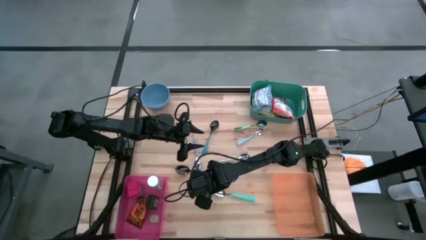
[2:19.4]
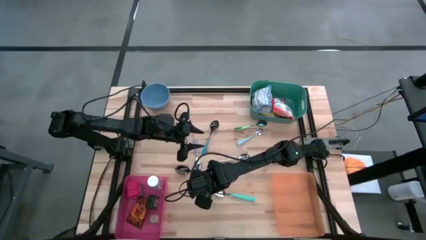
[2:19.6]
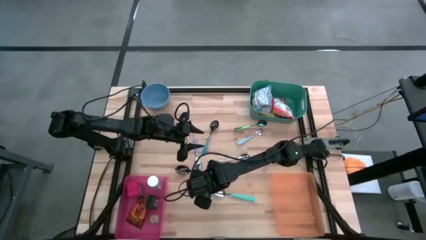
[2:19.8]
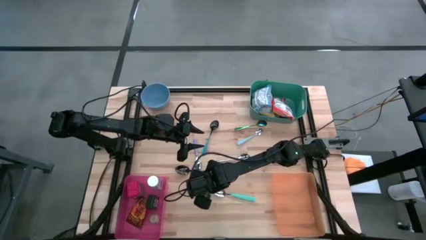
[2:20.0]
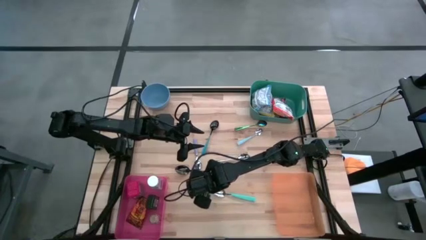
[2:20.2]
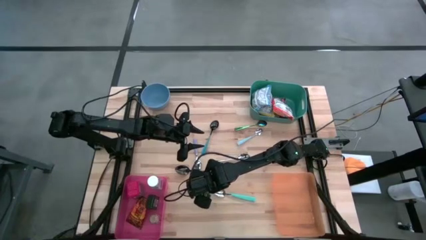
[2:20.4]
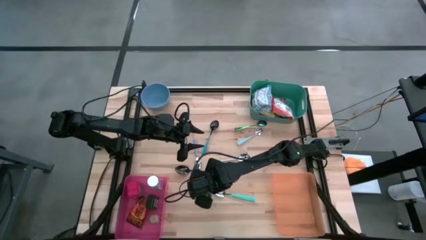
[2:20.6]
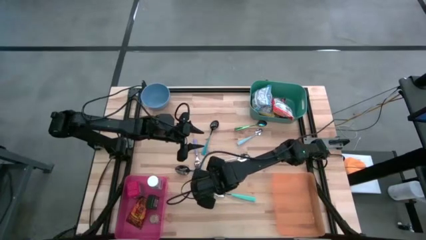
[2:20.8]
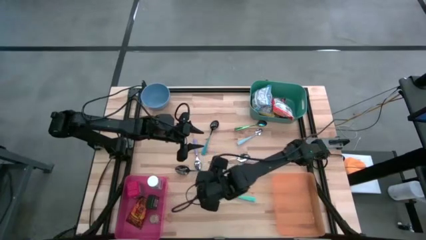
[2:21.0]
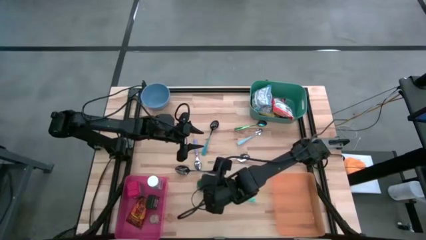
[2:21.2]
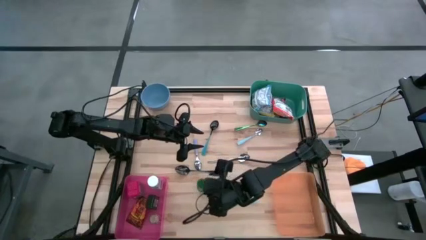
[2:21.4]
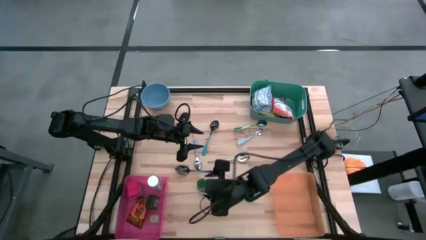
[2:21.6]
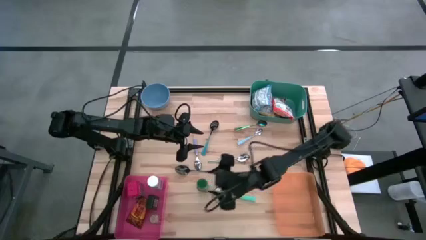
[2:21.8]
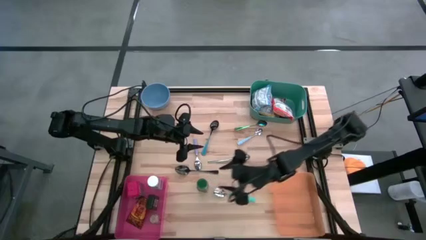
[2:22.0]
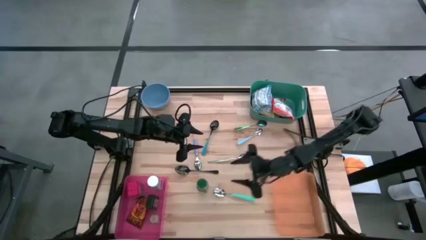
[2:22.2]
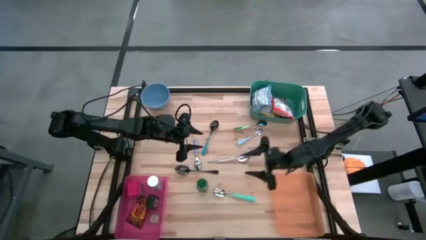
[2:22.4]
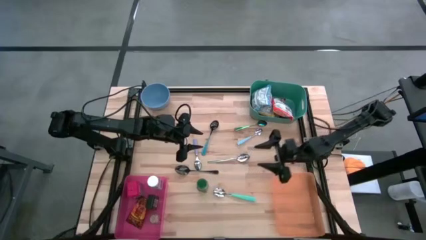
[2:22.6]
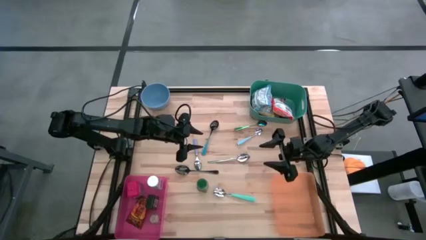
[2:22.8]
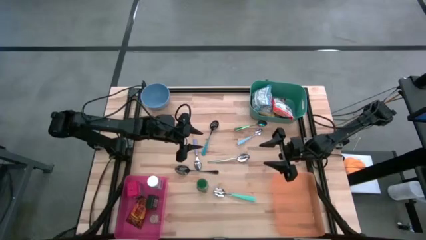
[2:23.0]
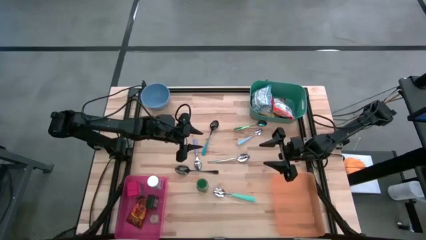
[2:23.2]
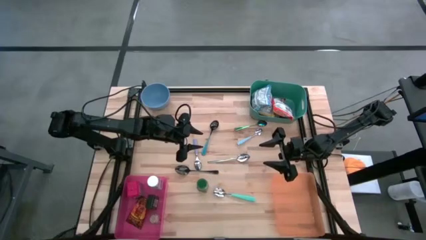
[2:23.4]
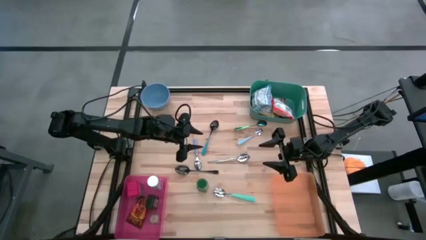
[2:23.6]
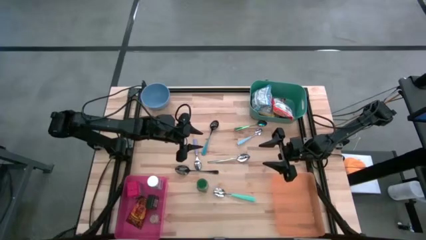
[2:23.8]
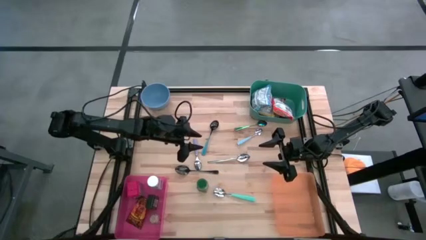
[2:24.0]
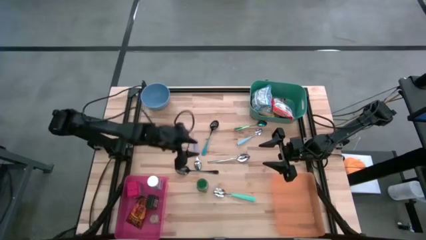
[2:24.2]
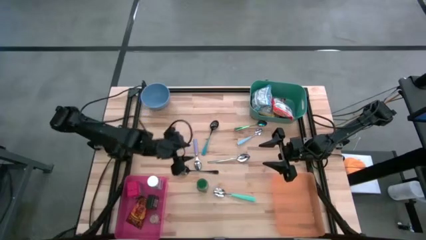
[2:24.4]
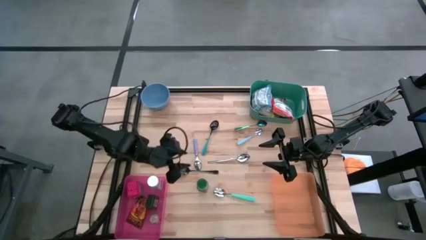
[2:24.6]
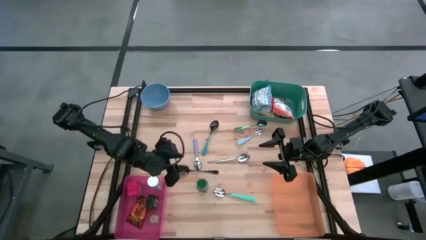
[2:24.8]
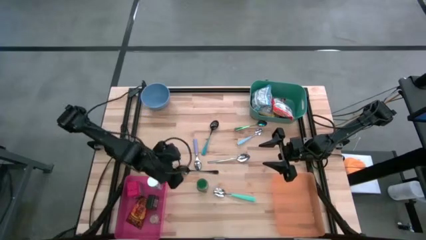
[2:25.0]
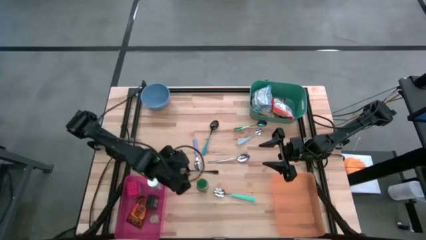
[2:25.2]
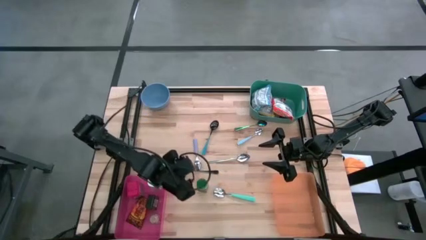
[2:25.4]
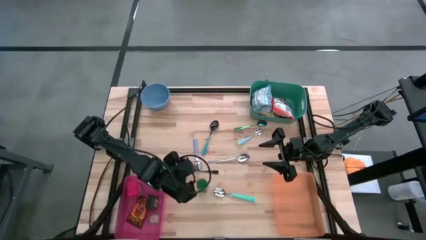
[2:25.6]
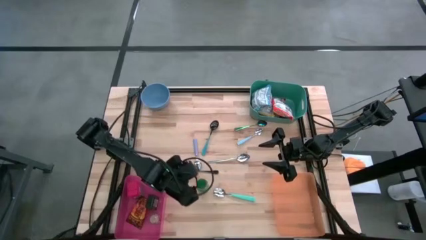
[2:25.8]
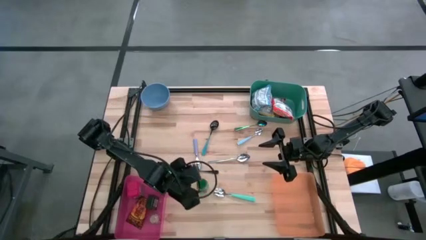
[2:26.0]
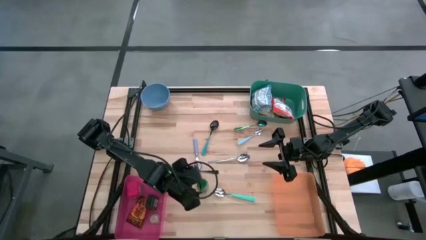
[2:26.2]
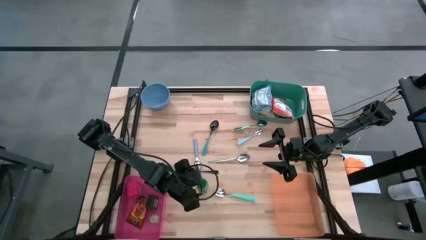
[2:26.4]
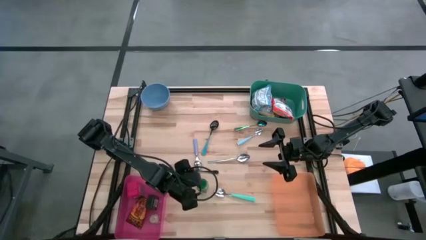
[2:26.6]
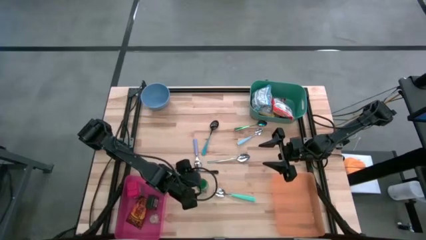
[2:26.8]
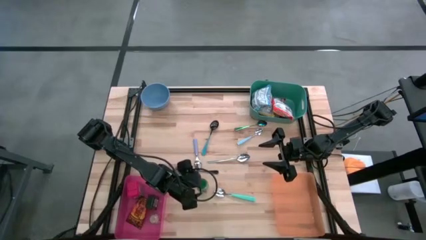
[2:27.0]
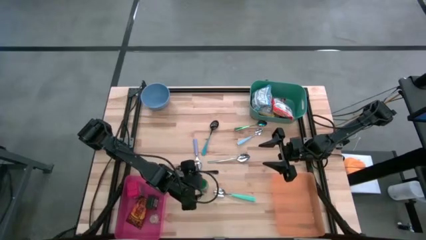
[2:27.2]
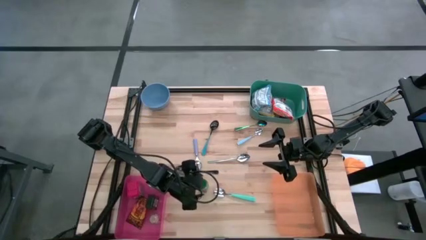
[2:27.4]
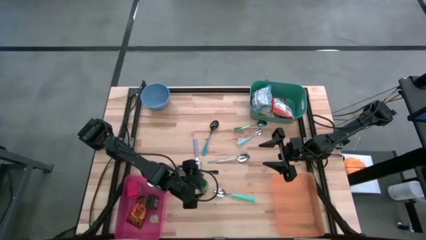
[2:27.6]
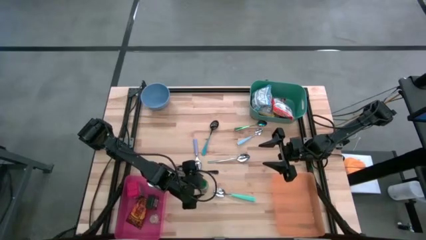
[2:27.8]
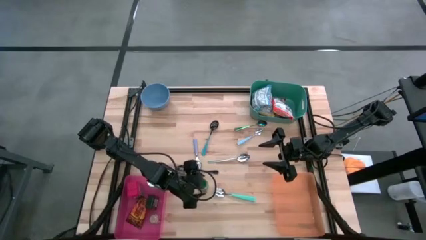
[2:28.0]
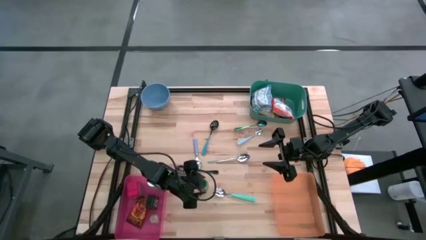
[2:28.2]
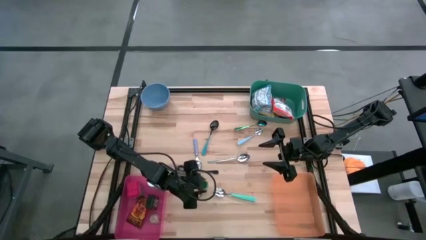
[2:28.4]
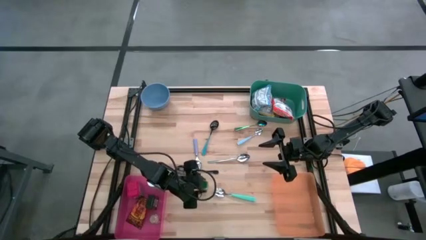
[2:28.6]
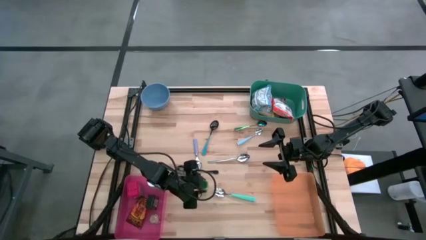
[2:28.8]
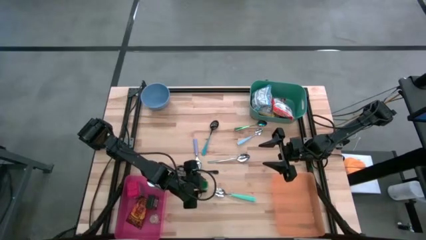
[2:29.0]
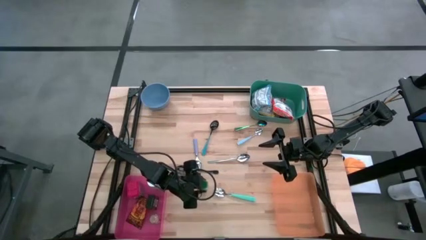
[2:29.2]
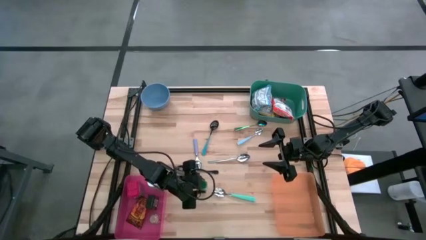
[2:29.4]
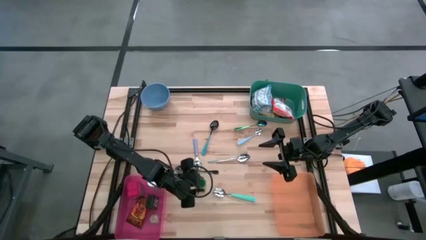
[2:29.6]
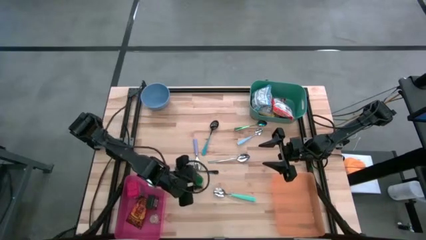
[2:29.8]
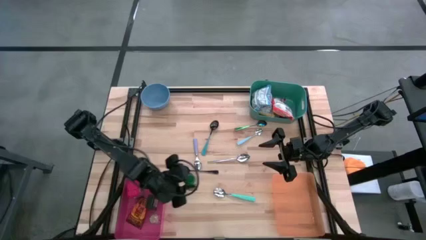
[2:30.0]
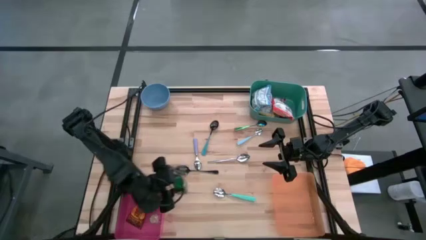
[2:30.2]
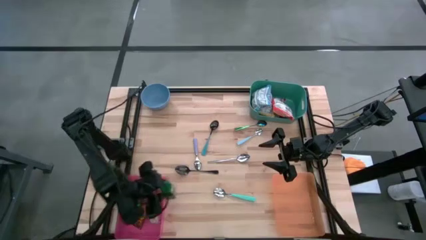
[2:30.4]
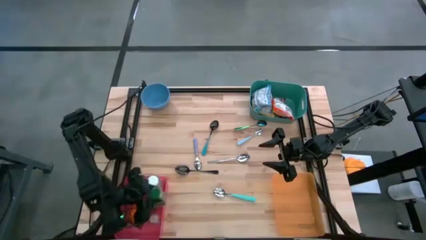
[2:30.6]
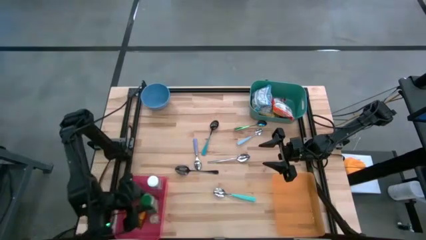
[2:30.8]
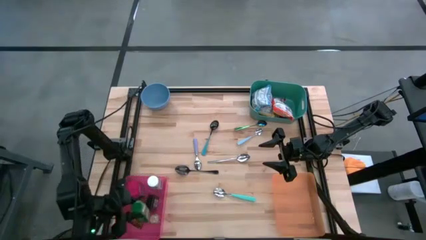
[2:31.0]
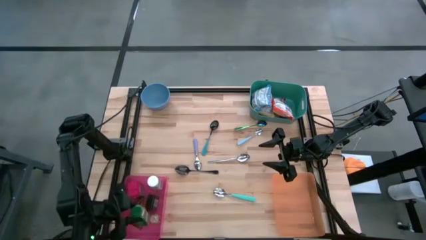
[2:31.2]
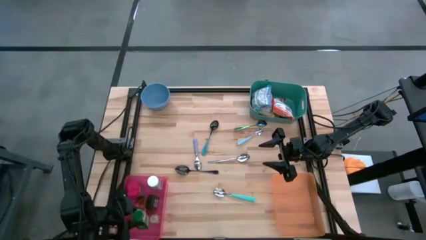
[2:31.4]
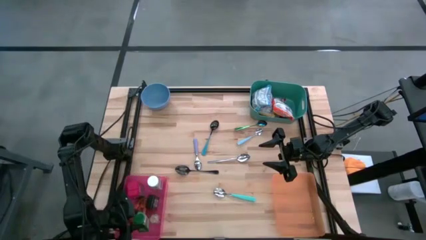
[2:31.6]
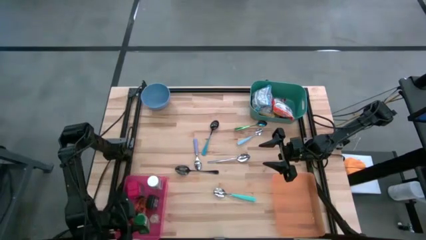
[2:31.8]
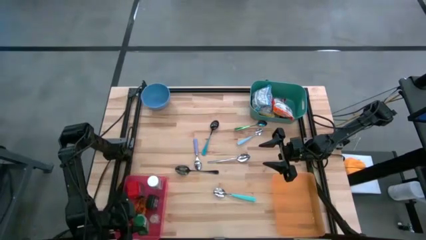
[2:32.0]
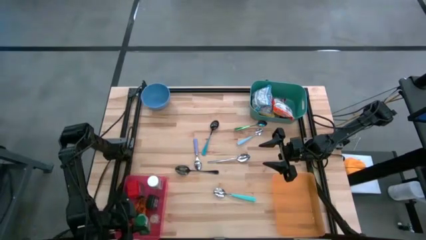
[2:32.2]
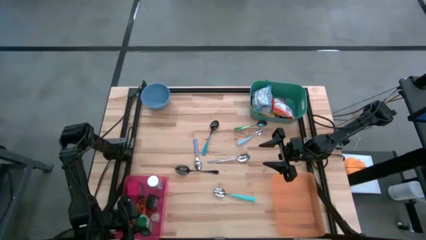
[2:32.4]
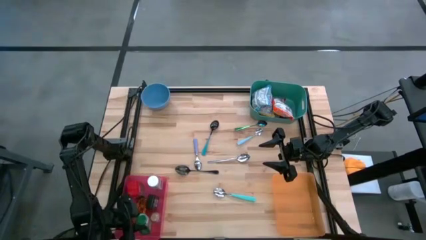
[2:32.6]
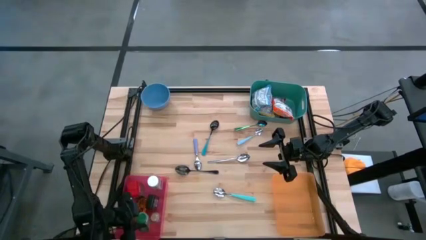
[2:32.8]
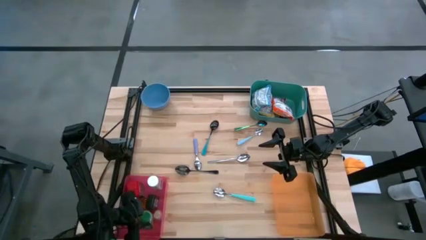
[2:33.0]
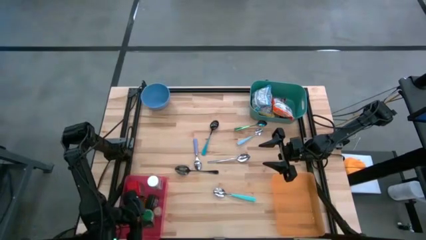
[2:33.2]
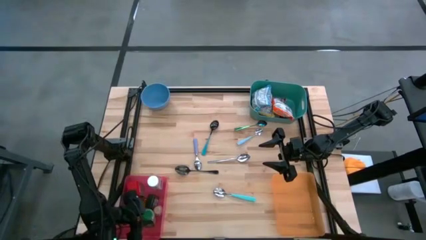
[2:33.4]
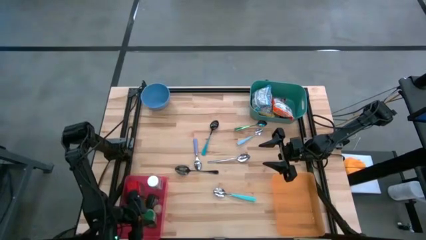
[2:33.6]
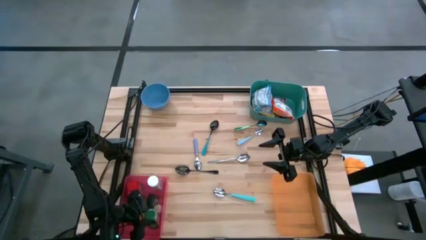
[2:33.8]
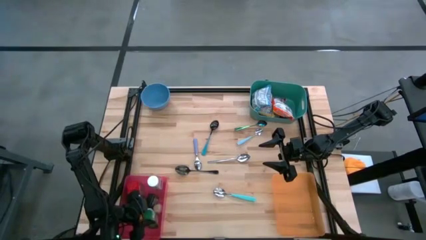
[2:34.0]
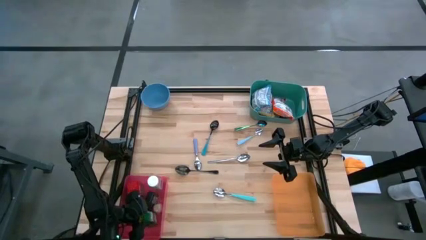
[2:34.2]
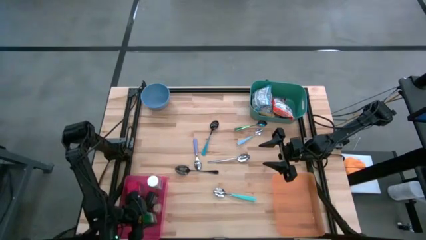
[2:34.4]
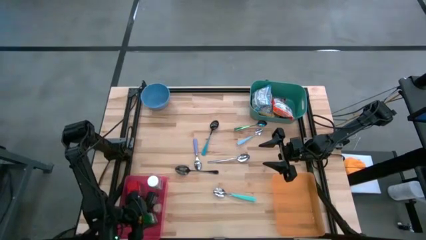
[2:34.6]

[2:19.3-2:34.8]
Put the green seasoning bottle into the pink bin
